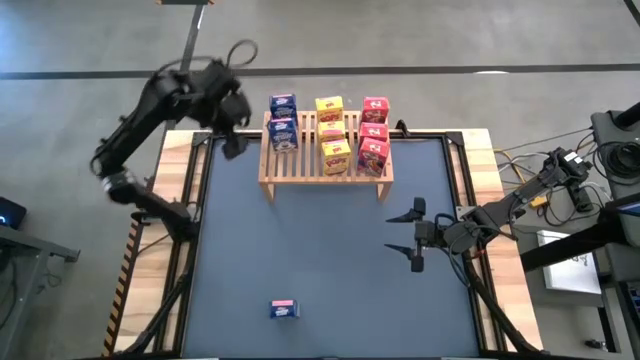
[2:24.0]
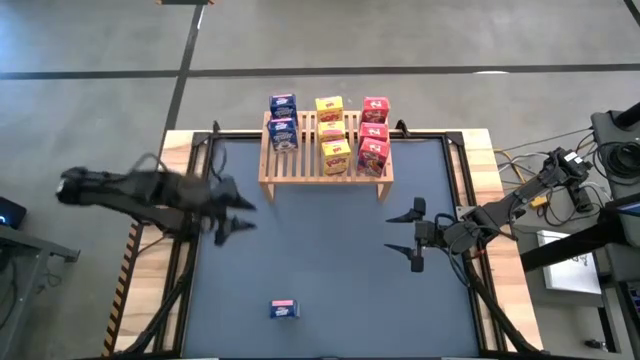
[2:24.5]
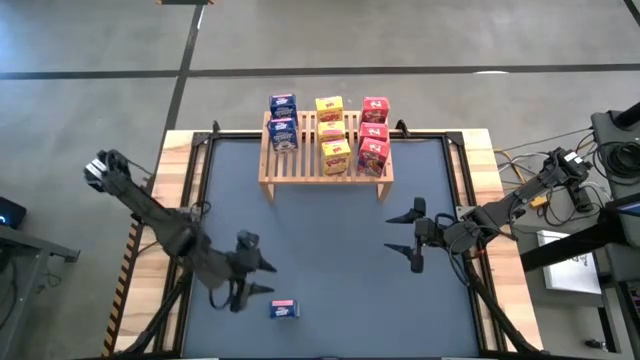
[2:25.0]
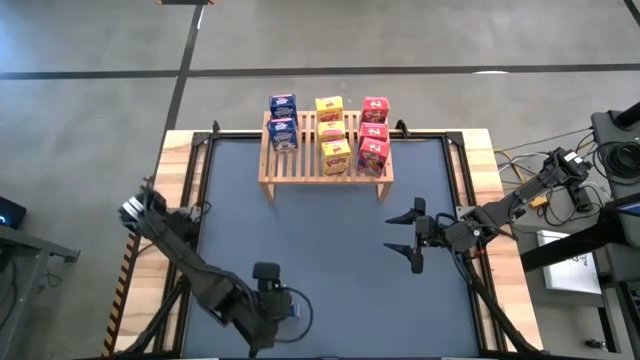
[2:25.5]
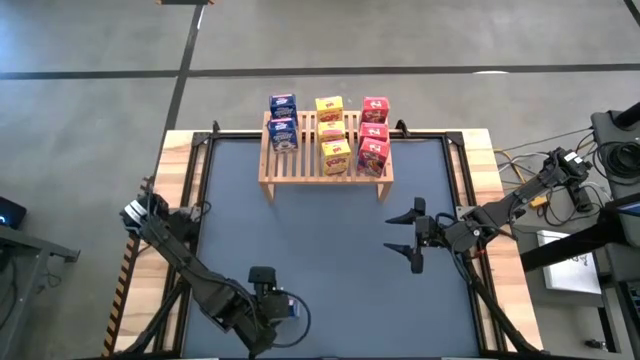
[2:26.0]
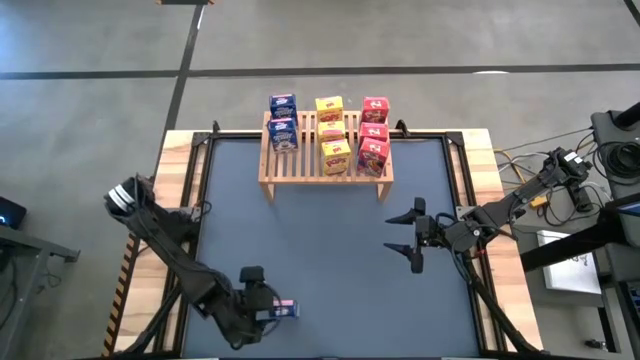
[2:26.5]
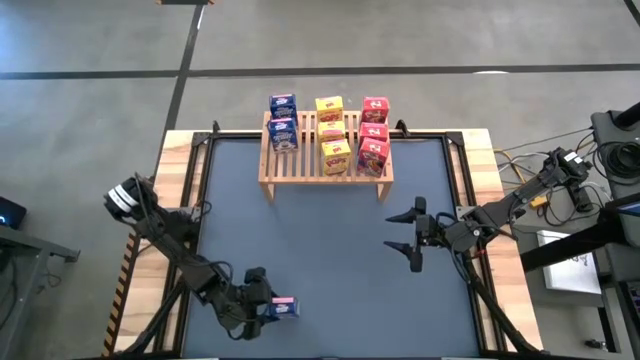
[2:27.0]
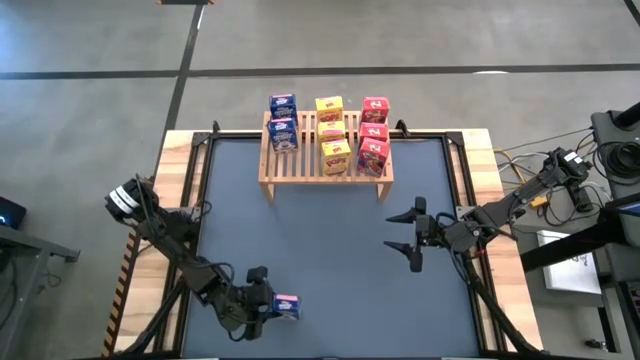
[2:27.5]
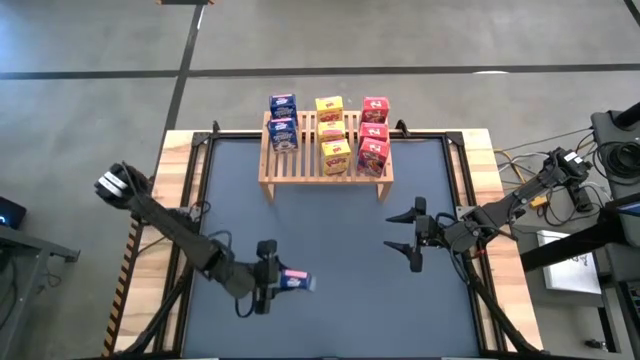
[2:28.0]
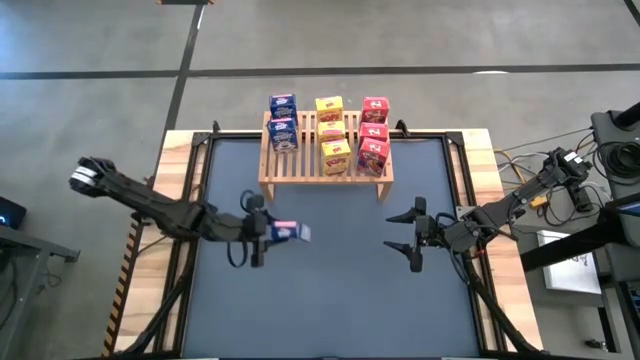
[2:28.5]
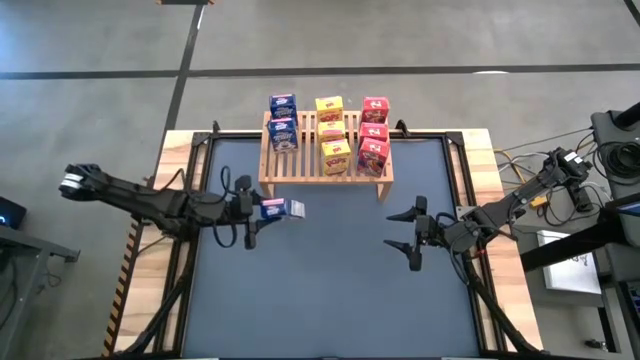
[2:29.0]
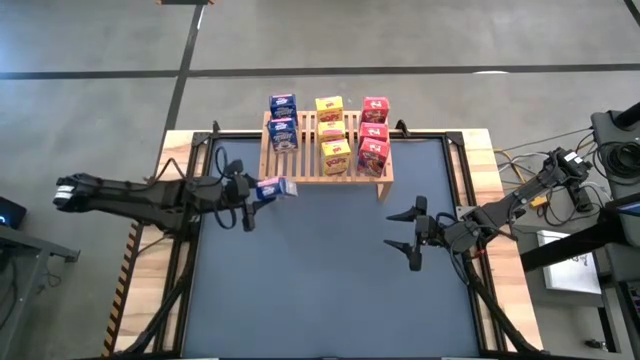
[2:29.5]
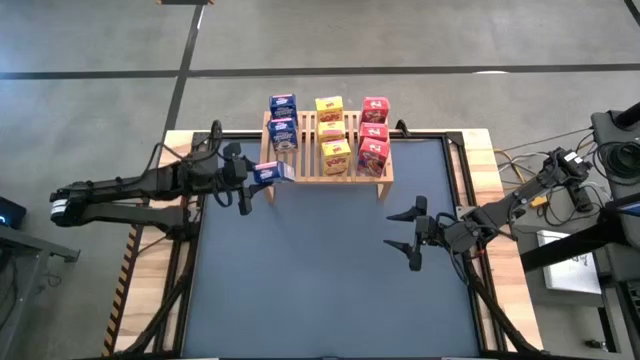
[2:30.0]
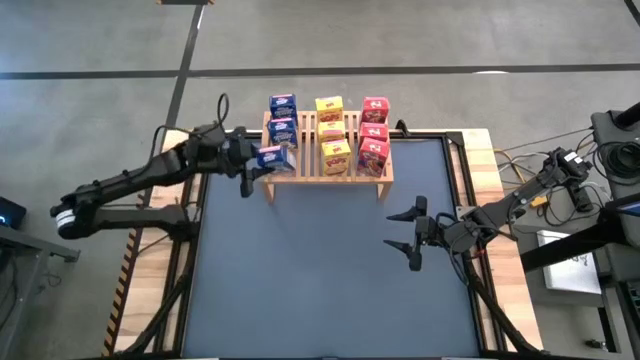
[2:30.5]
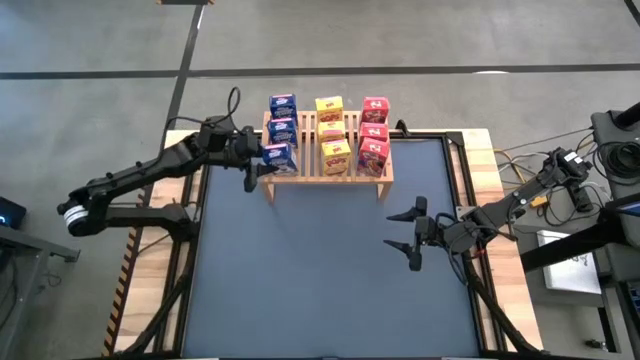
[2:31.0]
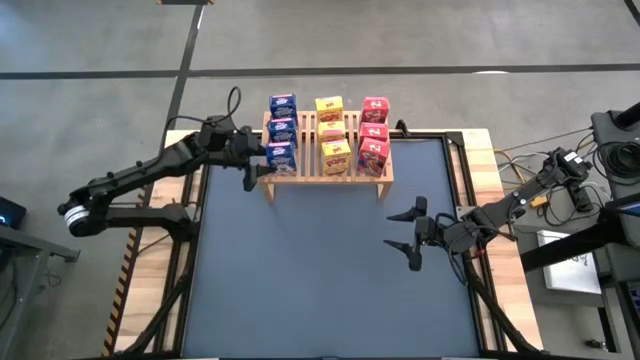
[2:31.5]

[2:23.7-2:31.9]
Task: Stack cereal on shelf
Put the blue cereal box on the shelf aligned with the other blue cereal boxes

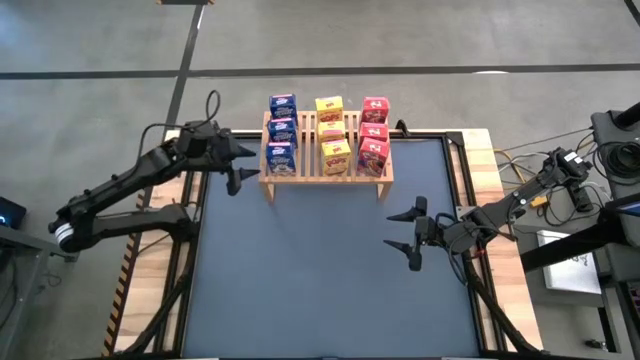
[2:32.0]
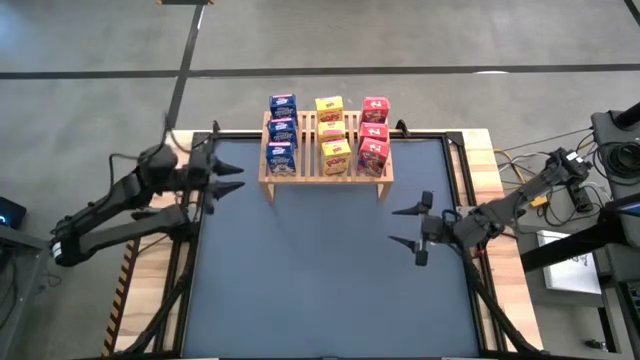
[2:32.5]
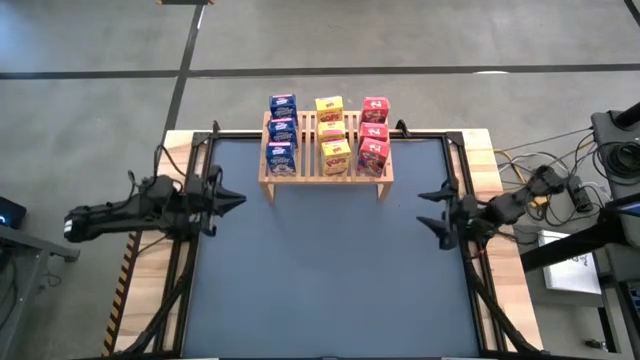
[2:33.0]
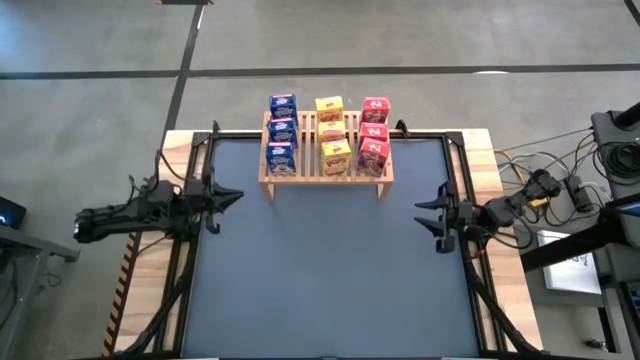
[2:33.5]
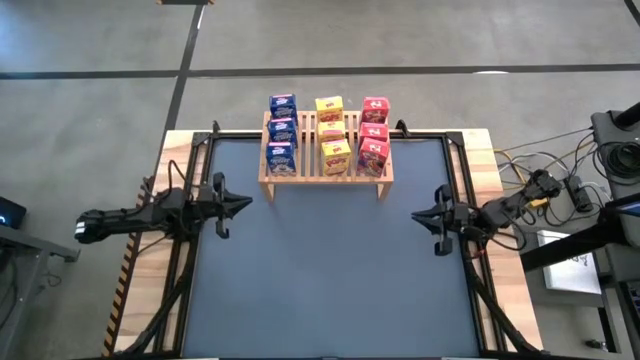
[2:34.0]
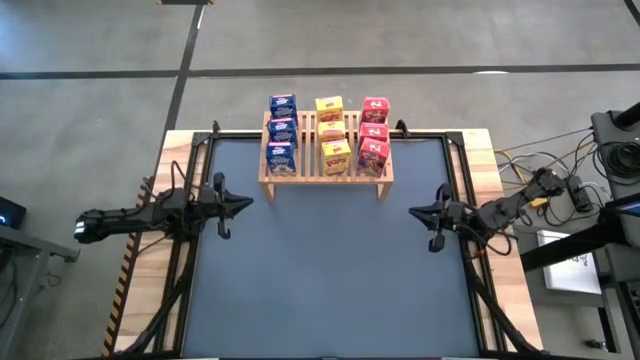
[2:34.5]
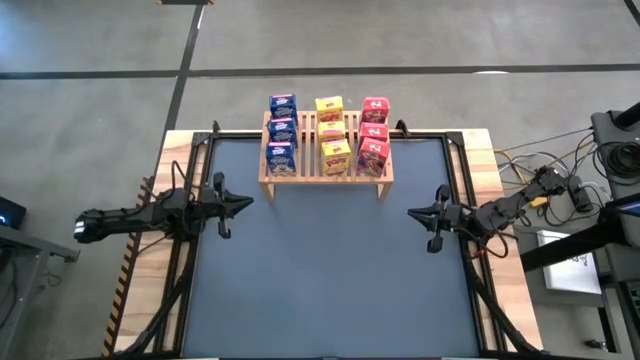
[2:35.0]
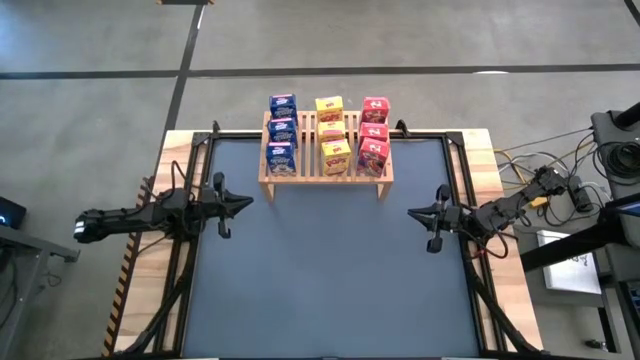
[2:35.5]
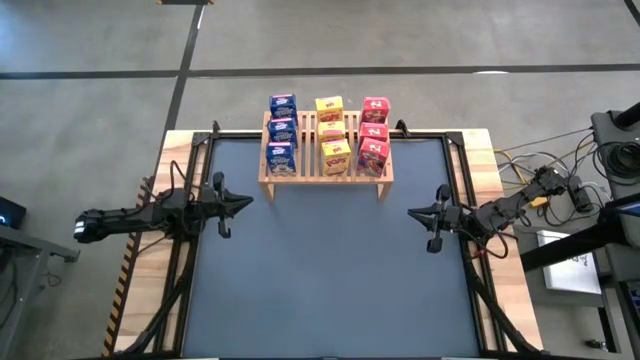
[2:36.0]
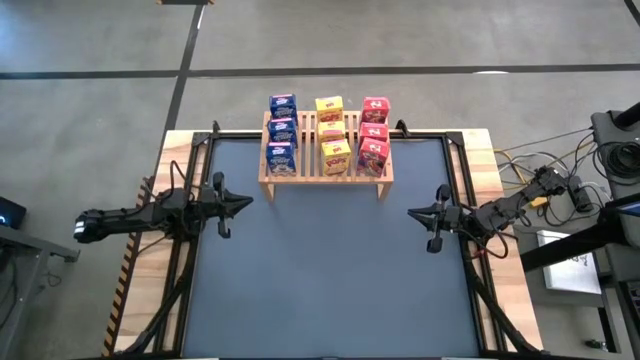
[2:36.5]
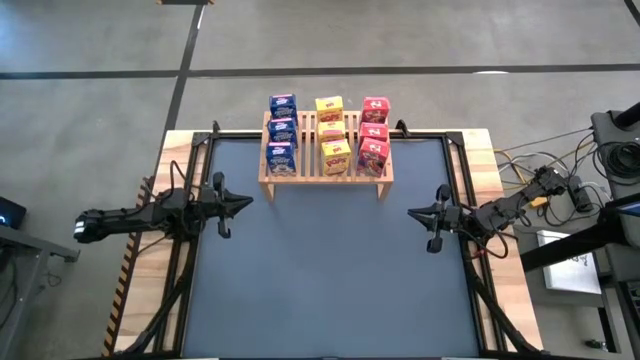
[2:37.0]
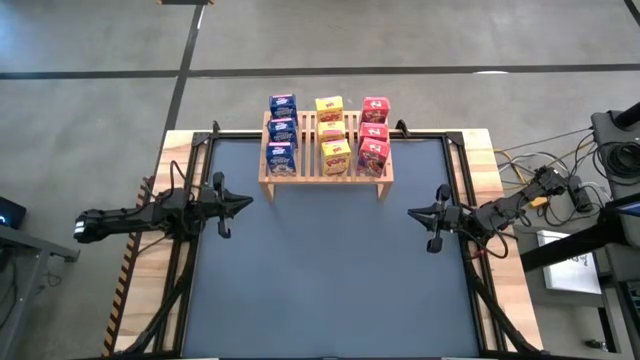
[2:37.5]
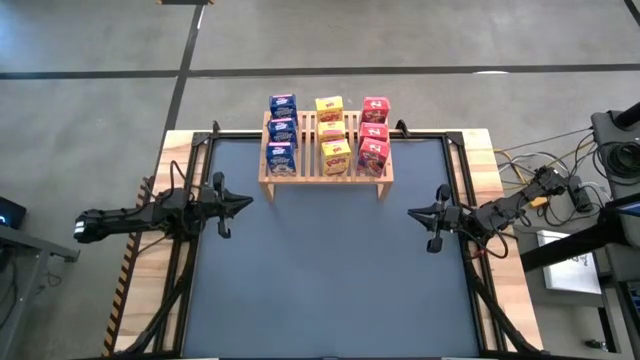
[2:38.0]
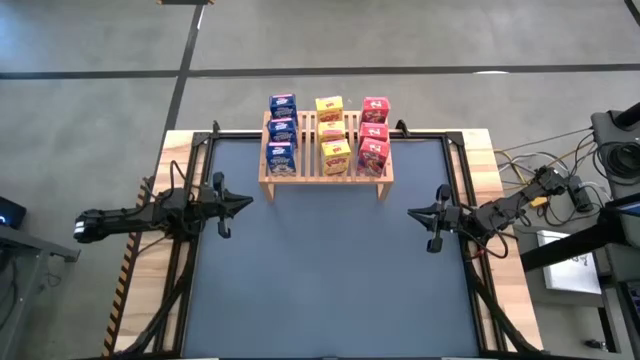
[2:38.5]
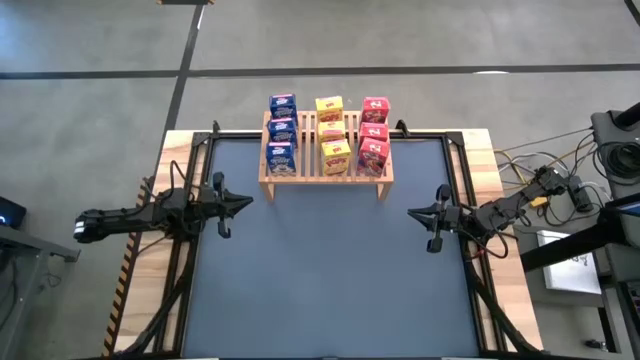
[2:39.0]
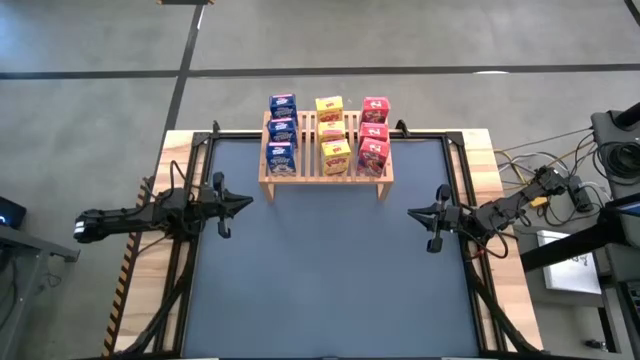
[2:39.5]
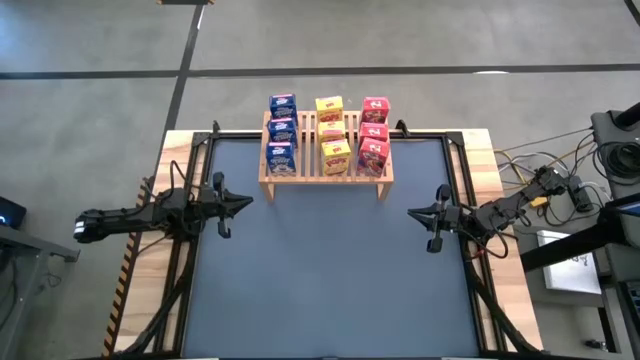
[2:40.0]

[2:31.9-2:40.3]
Return to Home Position

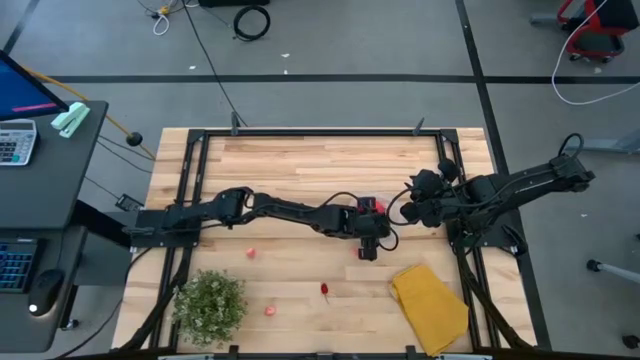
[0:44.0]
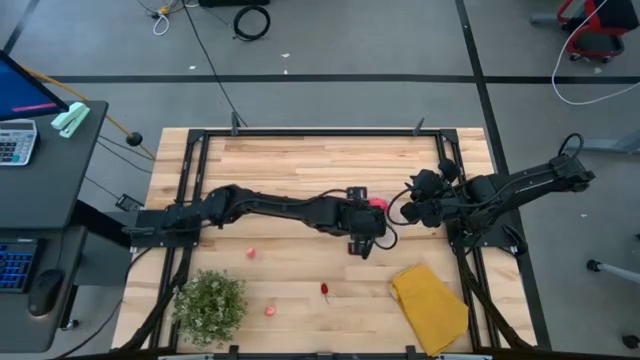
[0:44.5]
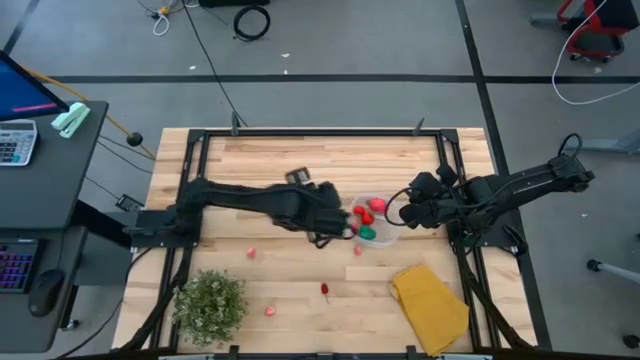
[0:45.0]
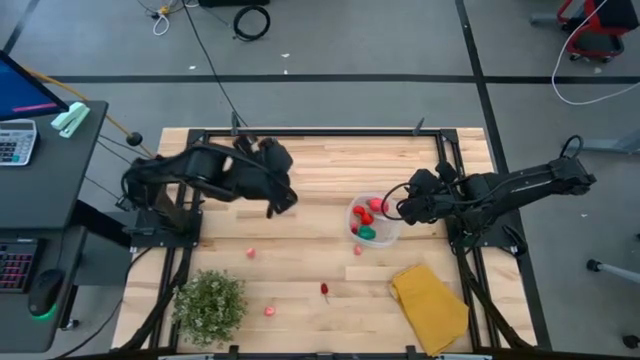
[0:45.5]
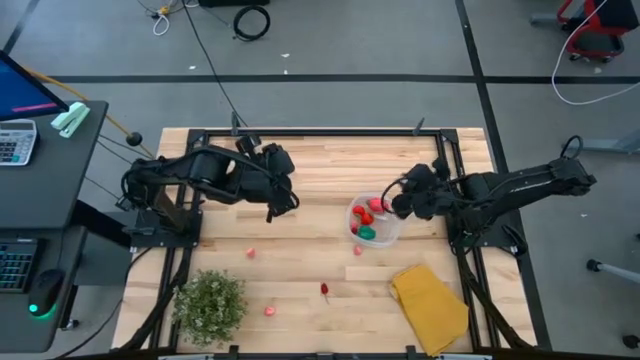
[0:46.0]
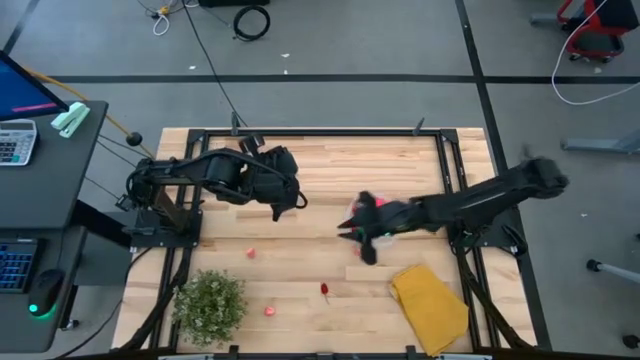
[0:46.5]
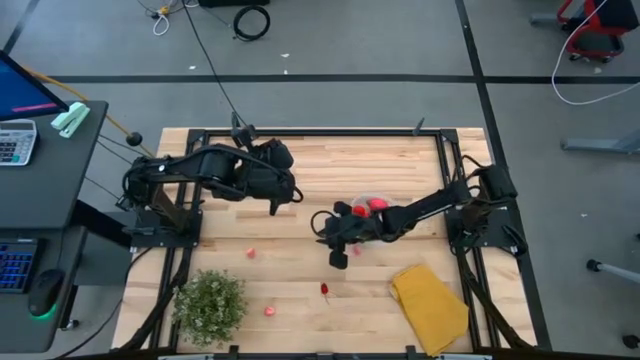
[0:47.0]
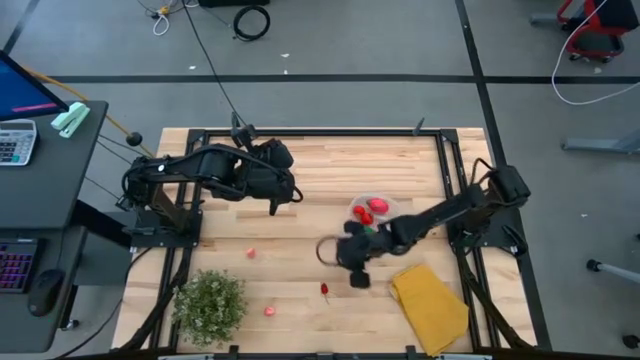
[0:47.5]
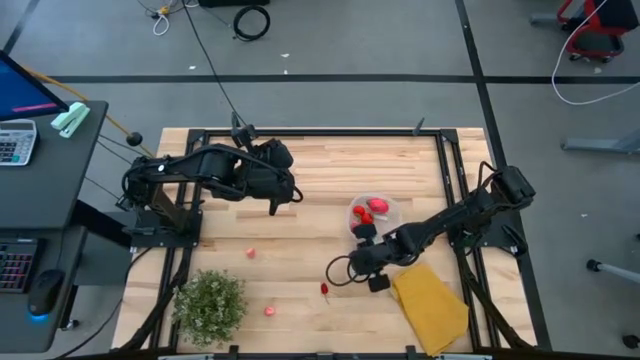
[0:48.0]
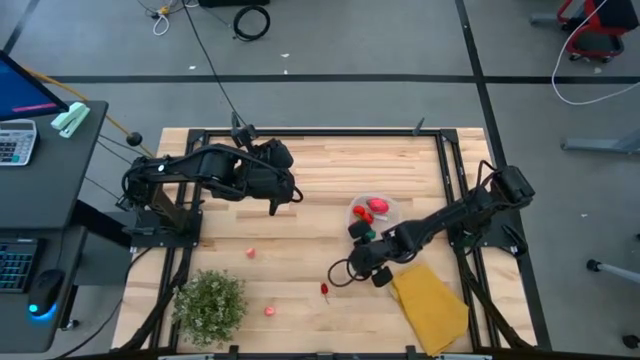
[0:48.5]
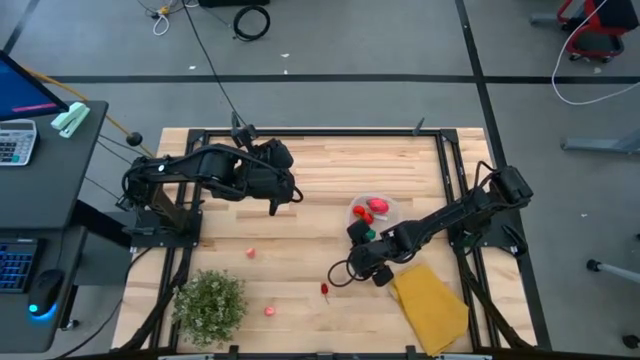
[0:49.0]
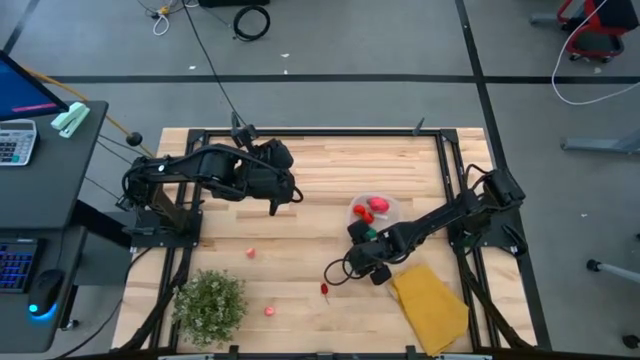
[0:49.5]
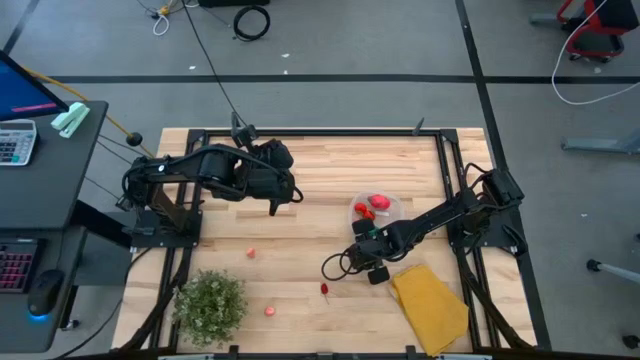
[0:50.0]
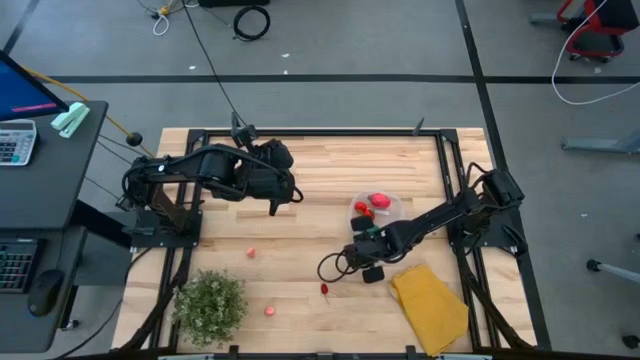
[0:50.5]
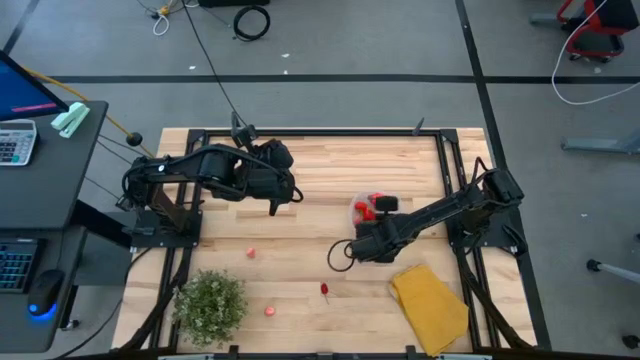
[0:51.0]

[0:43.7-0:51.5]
Task: Pick and placing Produce into tupperware
Put the pink peach into the transparent container
